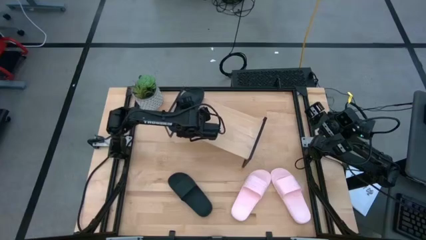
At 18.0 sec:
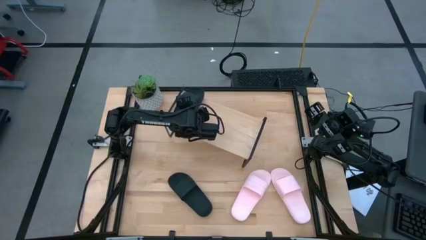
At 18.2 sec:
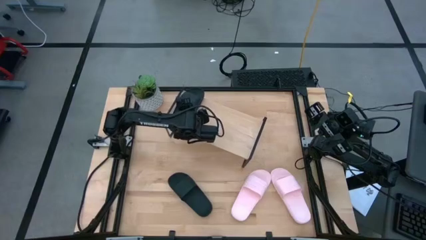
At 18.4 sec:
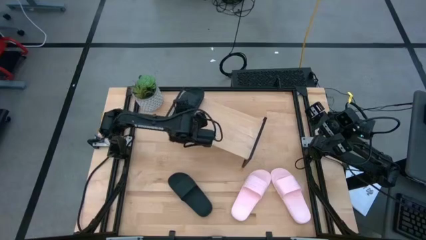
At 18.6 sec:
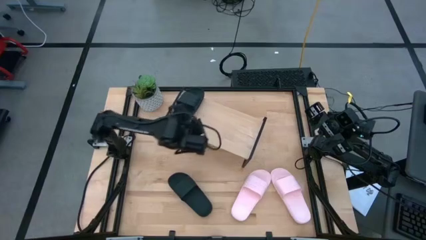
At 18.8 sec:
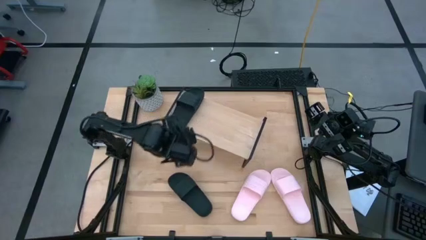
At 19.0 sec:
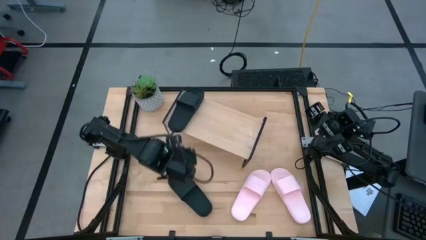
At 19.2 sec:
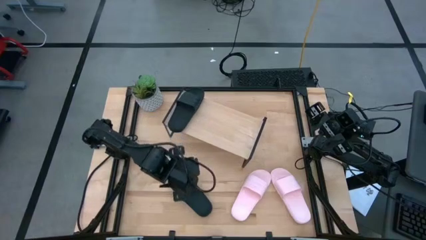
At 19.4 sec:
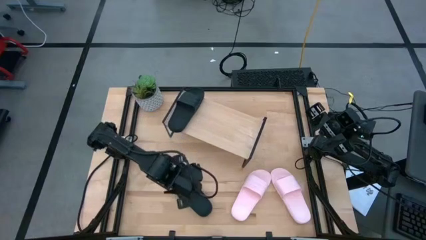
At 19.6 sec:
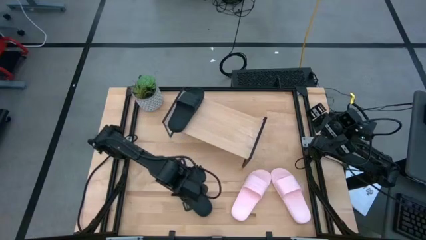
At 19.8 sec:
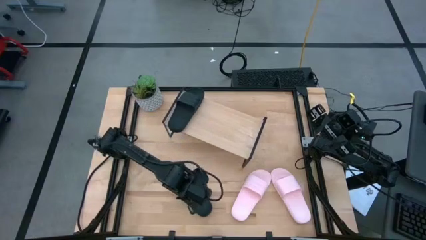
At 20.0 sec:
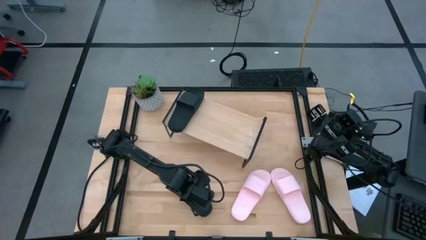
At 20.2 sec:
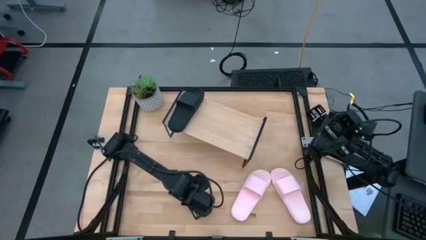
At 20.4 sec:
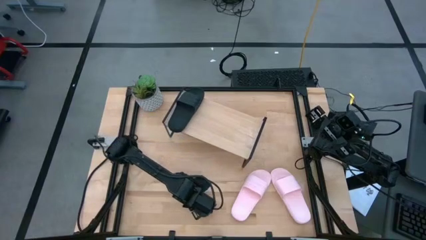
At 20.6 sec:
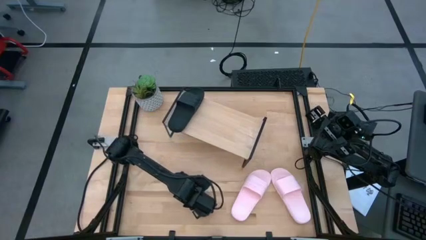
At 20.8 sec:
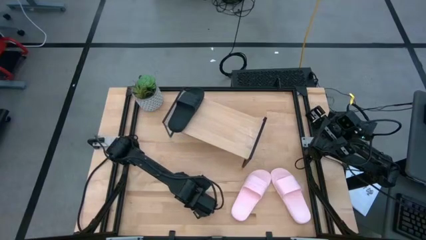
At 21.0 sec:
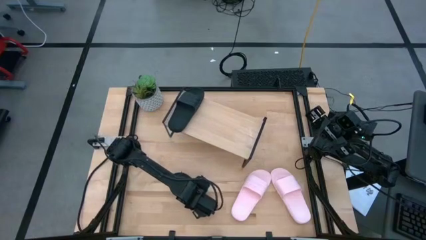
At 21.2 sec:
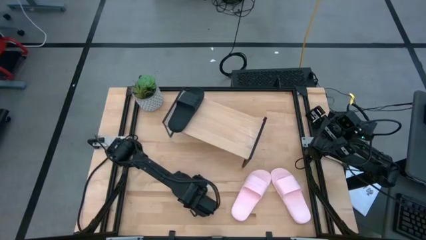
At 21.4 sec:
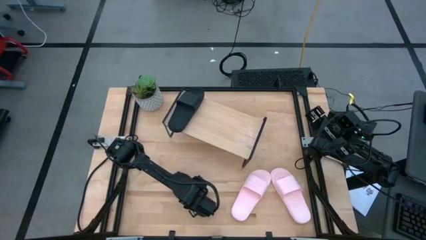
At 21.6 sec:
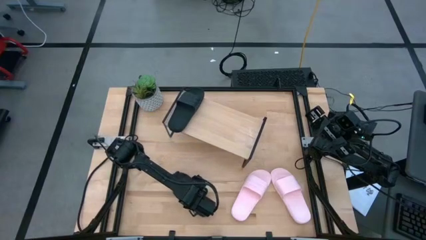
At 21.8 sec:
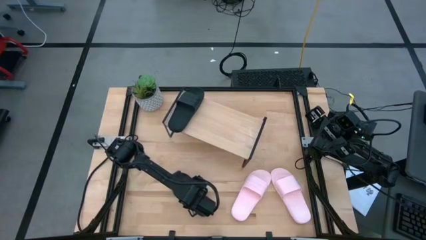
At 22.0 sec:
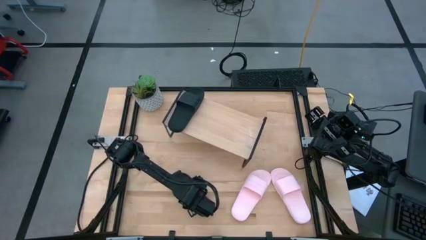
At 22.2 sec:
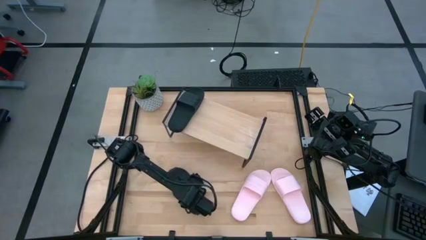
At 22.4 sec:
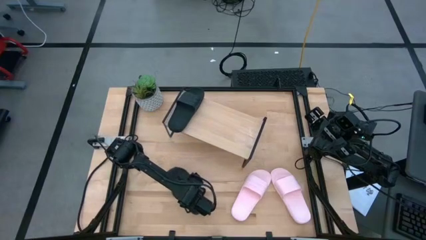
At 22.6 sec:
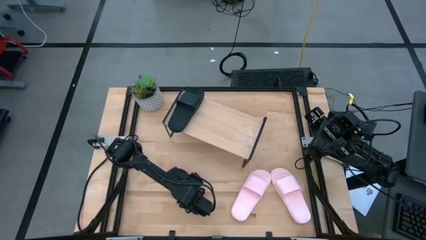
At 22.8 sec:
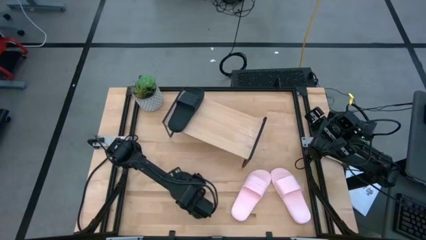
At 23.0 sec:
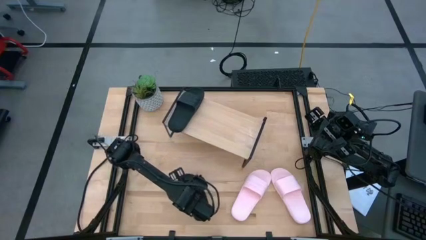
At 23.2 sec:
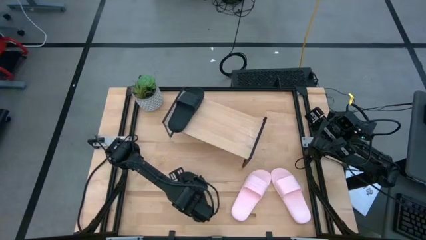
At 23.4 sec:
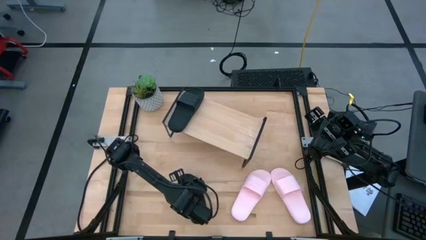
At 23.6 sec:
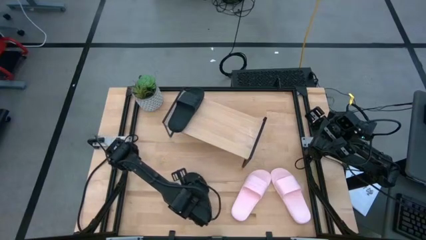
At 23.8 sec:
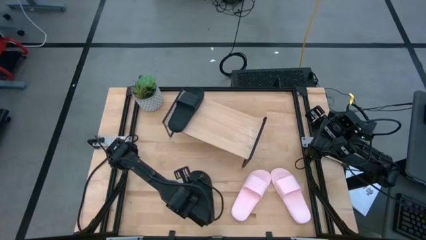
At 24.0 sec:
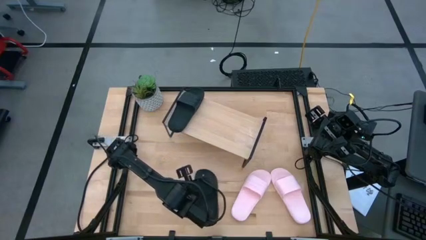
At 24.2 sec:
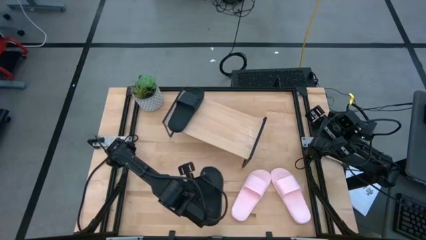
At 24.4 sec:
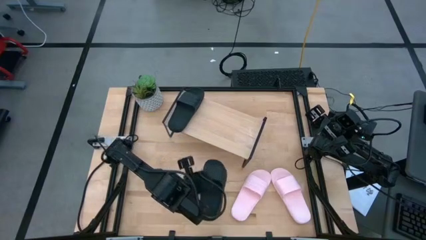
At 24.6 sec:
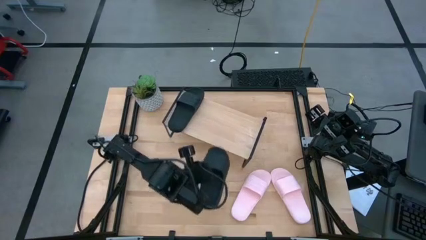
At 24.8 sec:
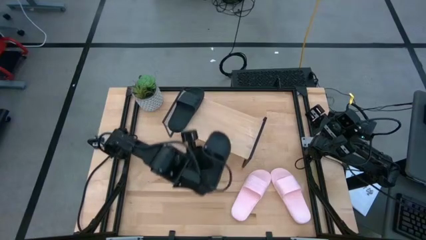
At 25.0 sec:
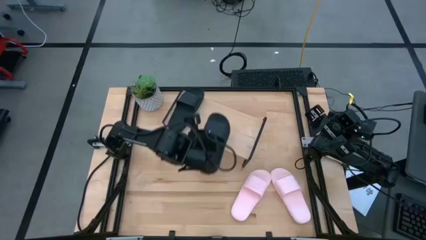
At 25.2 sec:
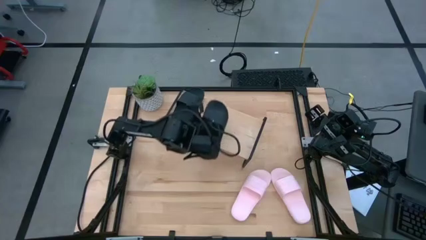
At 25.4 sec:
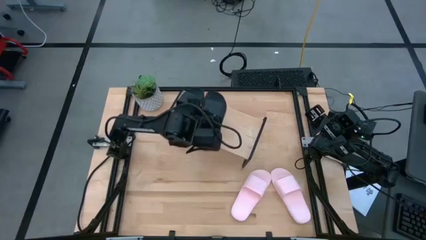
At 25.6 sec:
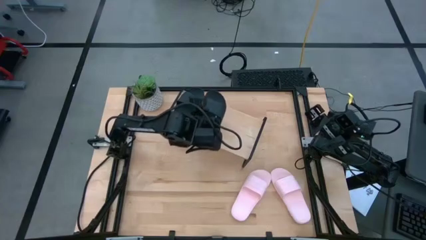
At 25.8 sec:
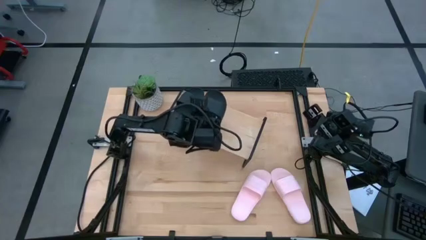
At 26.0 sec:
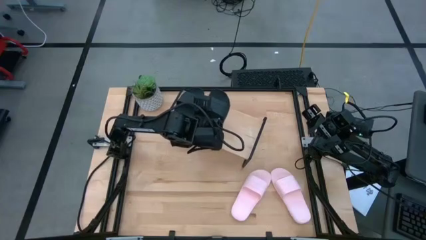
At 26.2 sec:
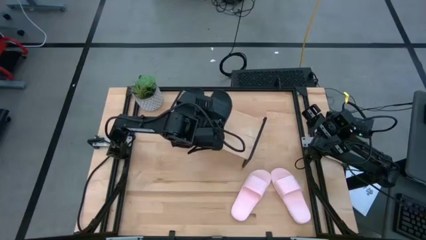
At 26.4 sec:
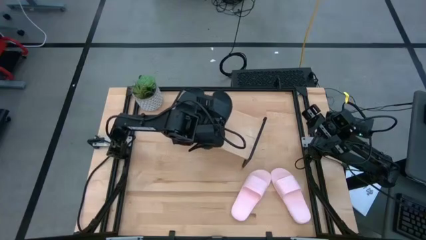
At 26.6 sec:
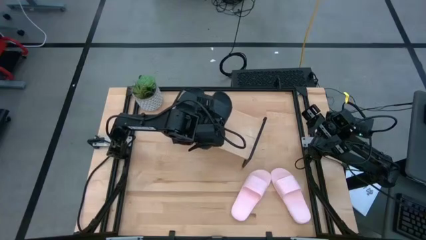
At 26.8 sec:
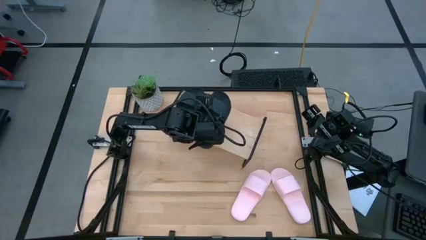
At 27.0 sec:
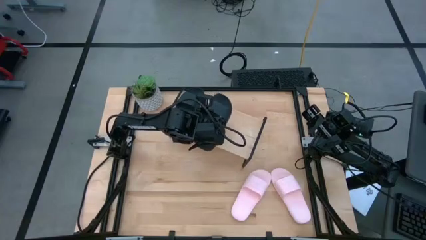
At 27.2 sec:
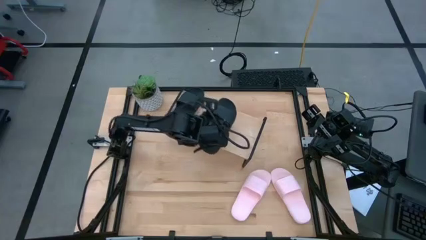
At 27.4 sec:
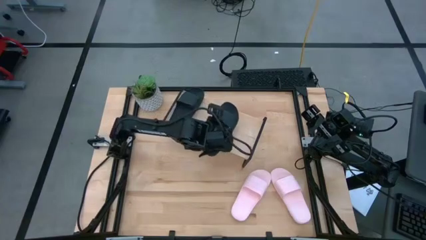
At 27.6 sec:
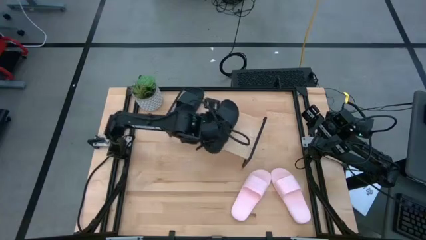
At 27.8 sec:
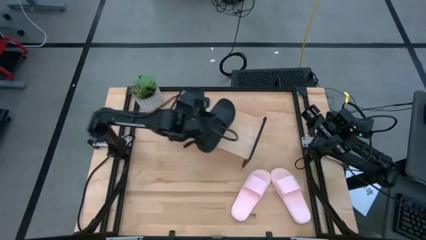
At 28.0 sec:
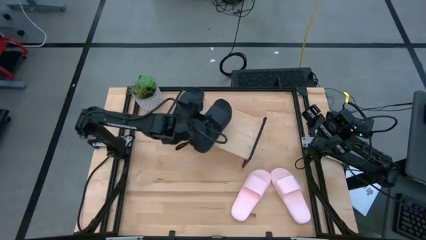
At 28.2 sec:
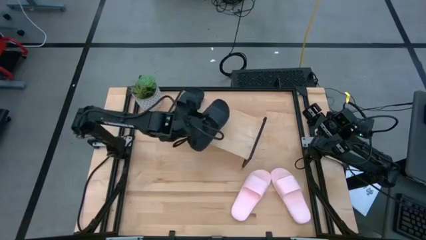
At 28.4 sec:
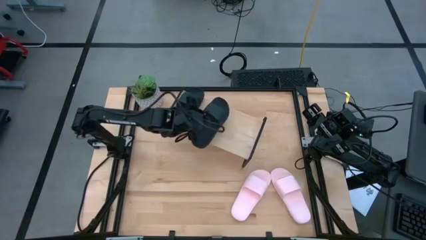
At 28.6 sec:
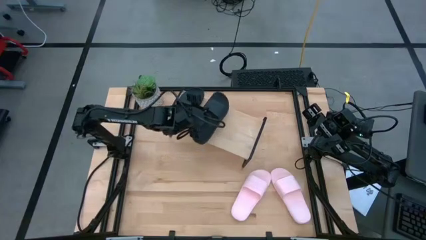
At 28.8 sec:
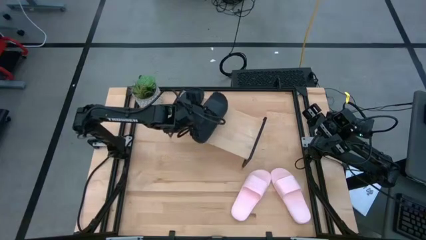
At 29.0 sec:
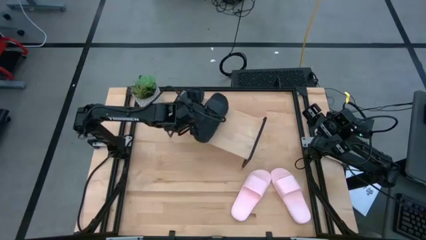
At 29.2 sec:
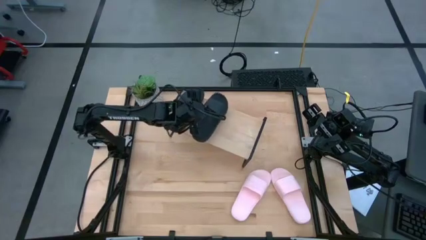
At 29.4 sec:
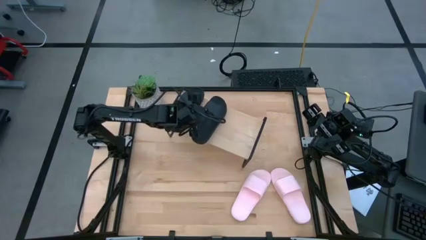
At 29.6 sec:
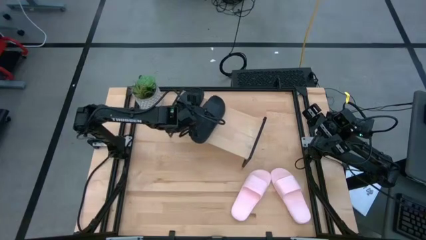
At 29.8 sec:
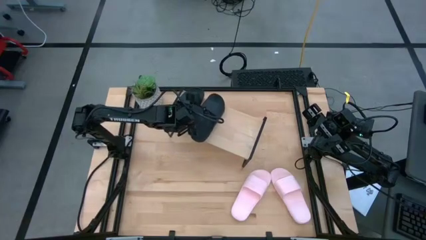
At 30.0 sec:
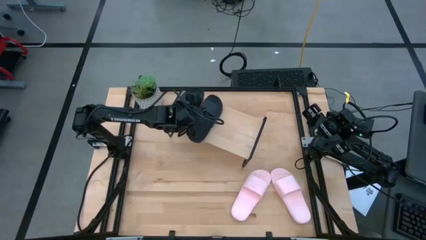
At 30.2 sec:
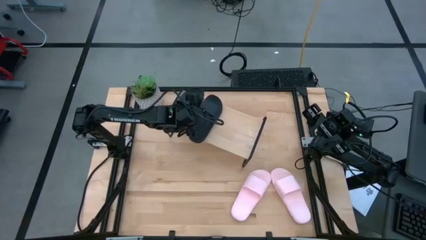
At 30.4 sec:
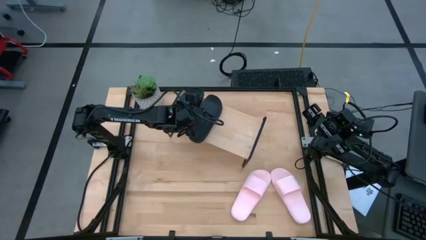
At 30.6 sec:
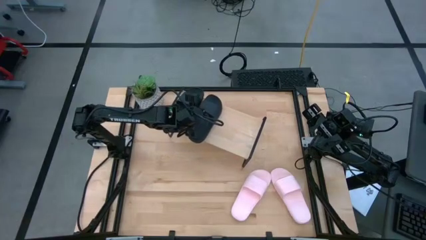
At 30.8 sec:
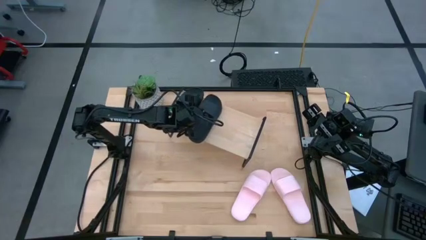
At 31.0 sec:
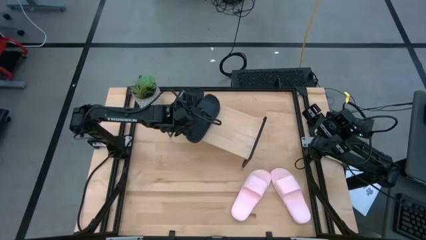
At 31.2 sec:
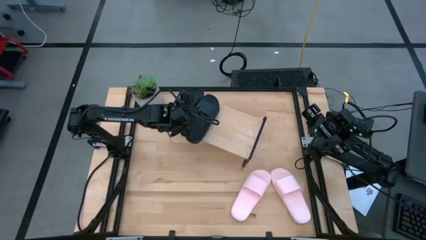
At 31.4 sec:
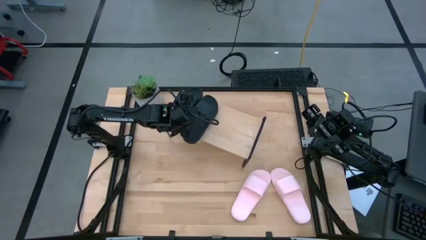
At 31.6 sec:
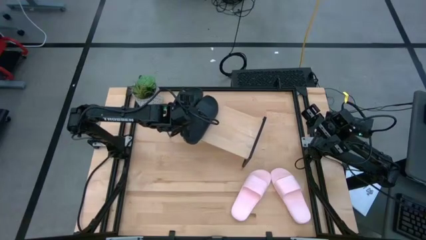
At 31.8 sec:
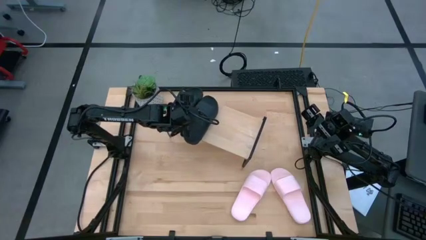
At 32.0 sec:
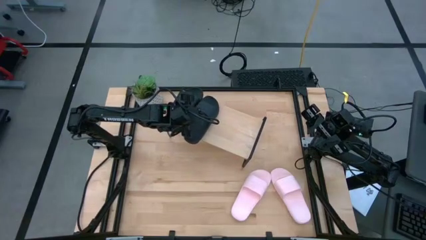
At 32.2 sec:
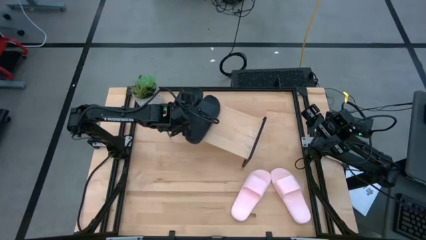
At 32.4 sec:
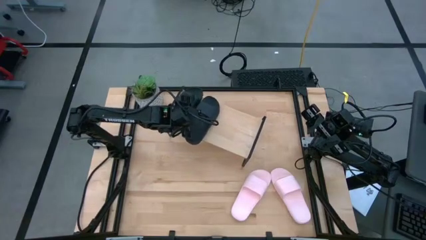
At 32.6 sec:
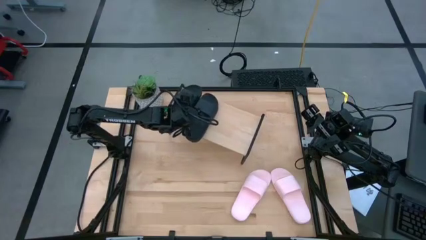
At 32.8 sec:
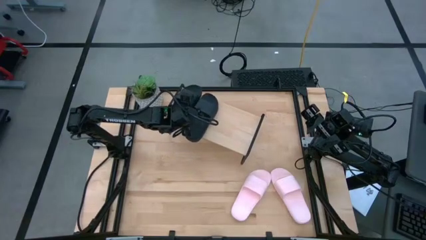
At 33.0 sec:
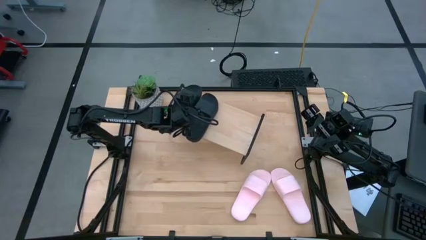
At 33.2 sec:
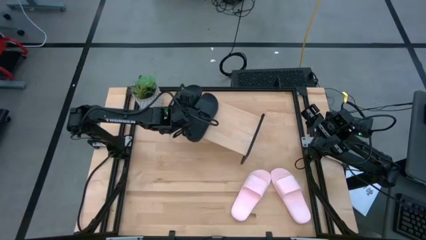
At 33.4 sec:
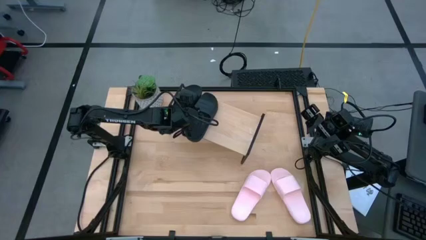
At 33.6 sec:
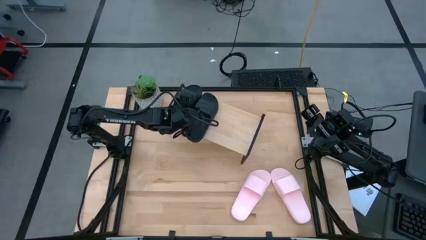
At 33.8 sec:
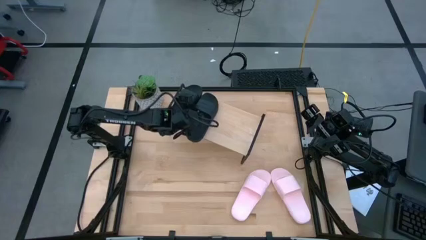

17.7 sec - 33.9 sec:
Task: Pick and place slides into the shelf
Put the black slide on the shelf
